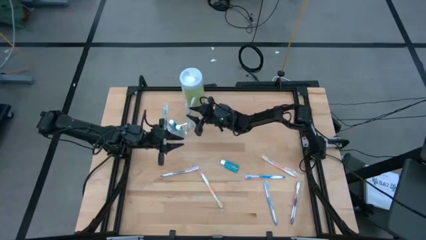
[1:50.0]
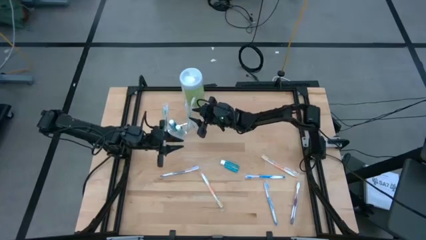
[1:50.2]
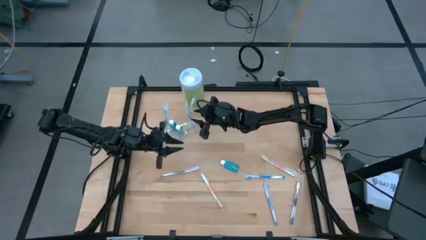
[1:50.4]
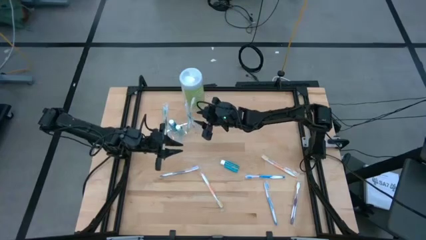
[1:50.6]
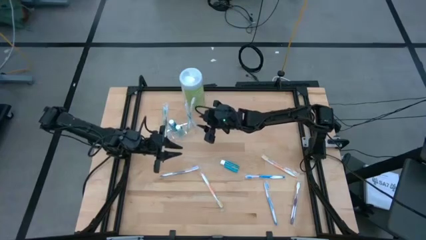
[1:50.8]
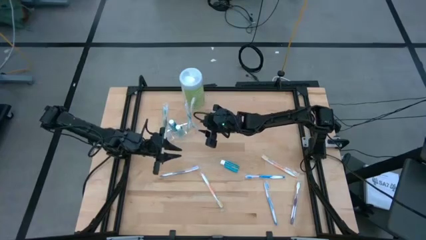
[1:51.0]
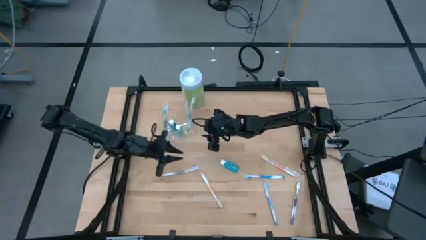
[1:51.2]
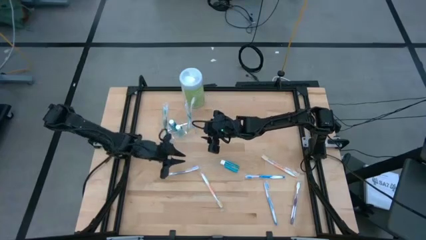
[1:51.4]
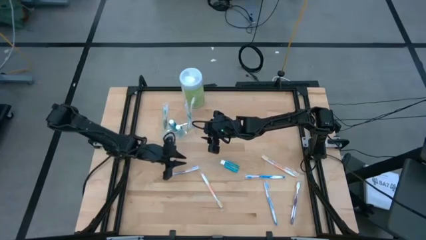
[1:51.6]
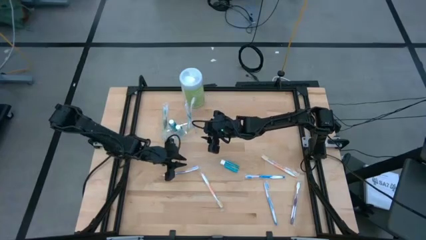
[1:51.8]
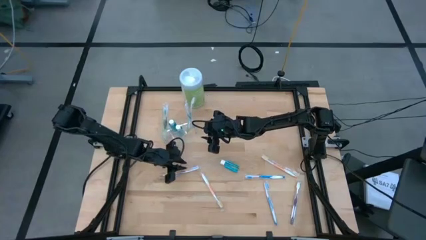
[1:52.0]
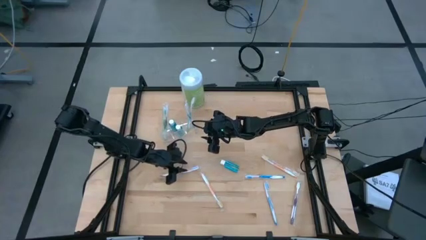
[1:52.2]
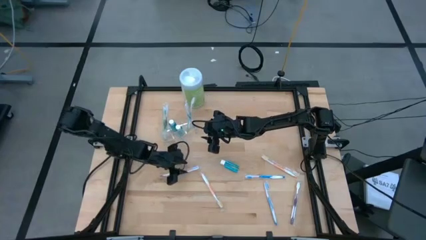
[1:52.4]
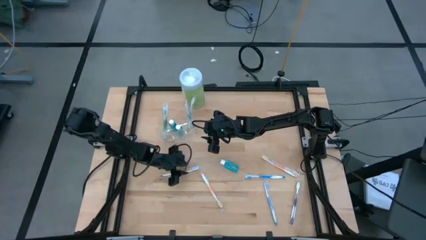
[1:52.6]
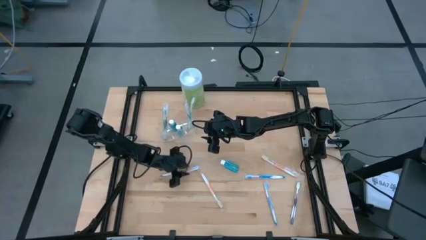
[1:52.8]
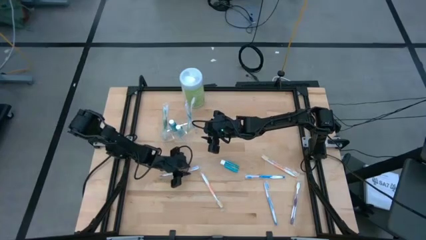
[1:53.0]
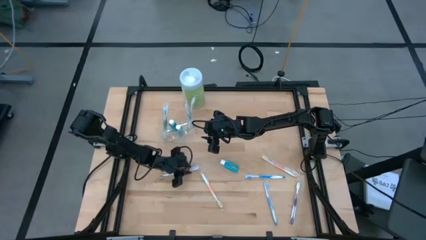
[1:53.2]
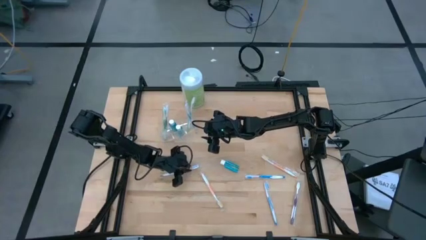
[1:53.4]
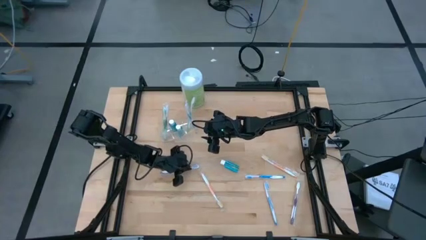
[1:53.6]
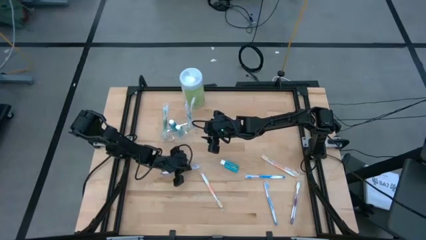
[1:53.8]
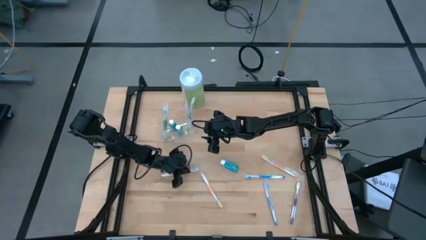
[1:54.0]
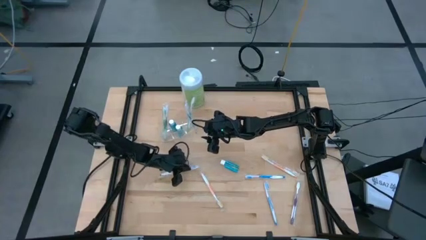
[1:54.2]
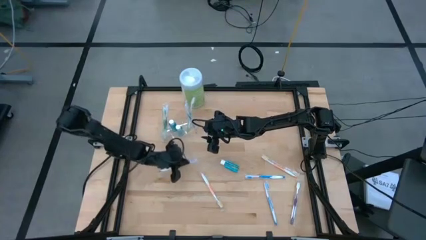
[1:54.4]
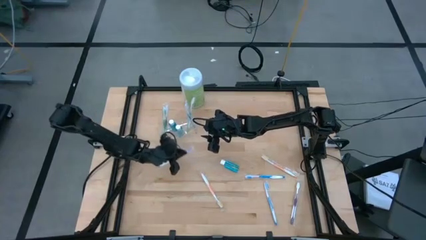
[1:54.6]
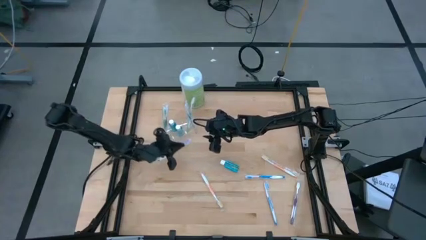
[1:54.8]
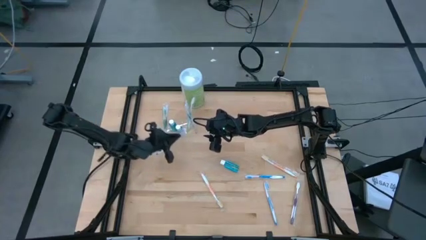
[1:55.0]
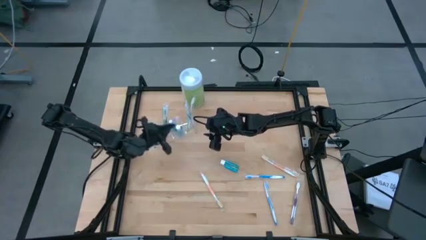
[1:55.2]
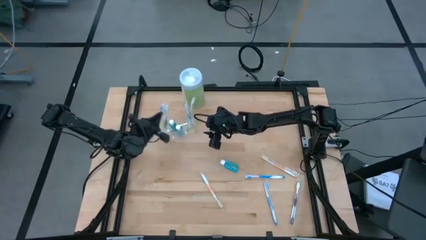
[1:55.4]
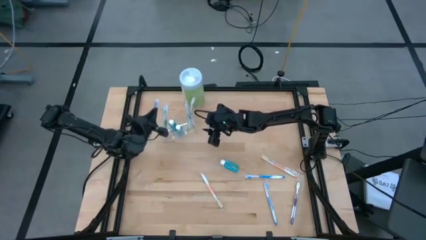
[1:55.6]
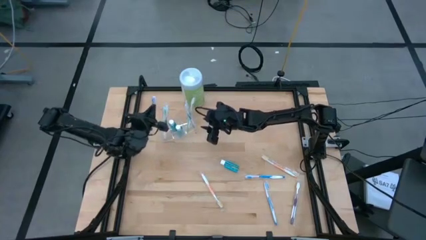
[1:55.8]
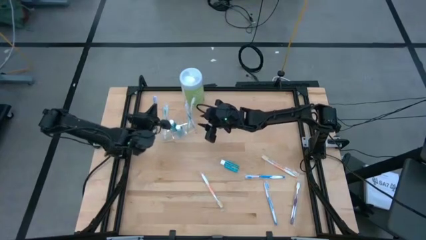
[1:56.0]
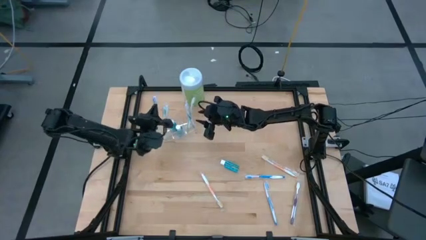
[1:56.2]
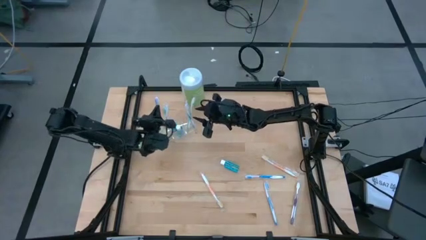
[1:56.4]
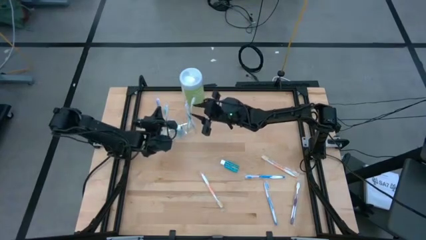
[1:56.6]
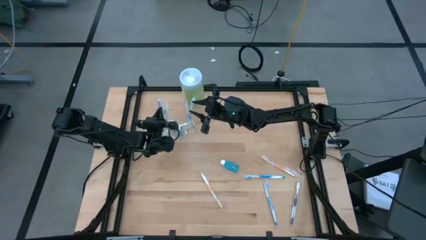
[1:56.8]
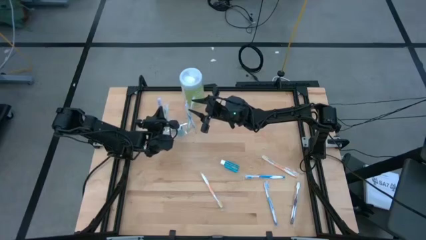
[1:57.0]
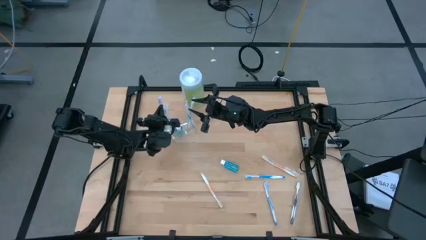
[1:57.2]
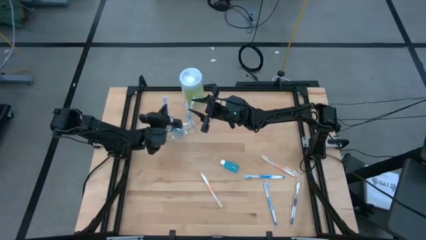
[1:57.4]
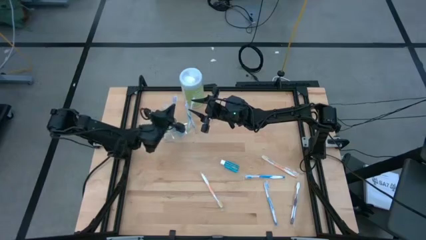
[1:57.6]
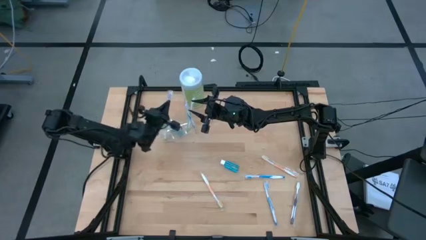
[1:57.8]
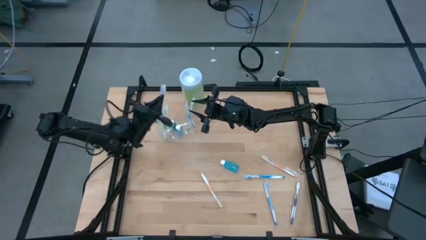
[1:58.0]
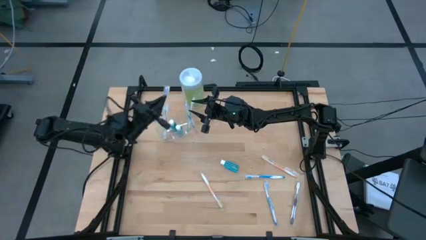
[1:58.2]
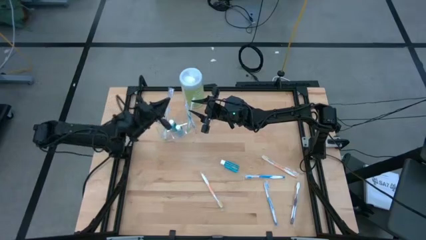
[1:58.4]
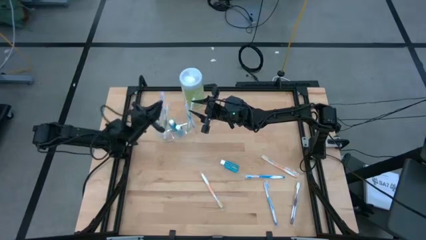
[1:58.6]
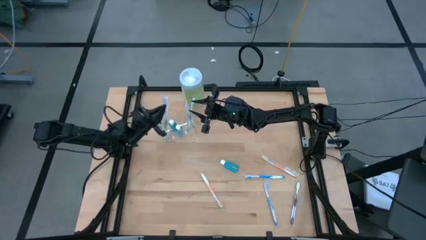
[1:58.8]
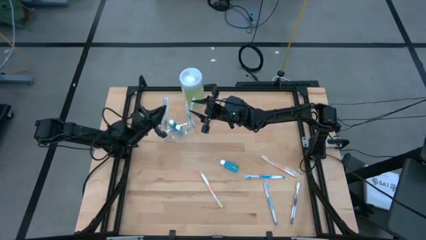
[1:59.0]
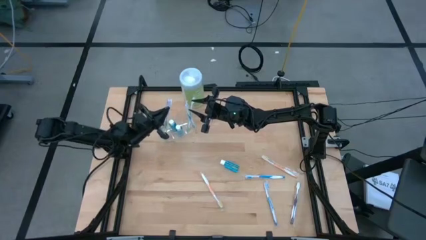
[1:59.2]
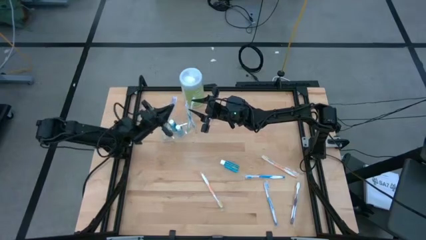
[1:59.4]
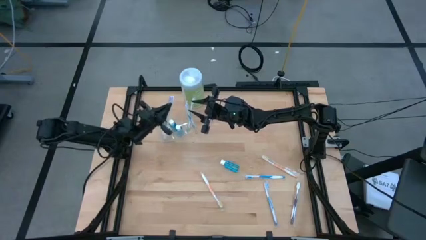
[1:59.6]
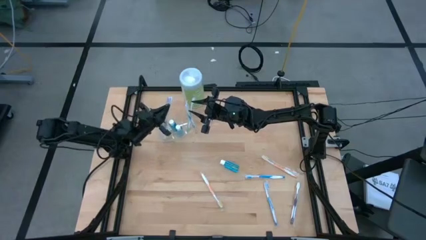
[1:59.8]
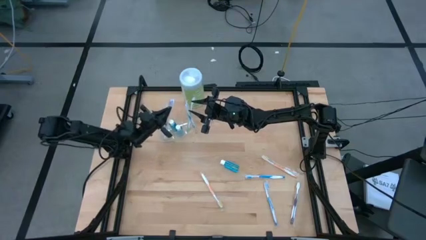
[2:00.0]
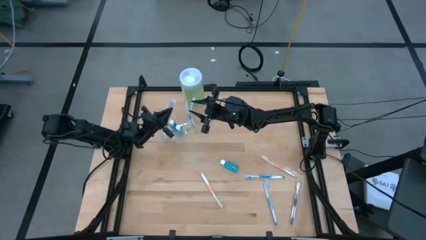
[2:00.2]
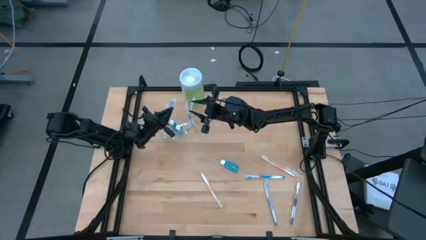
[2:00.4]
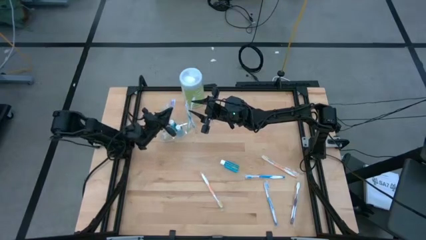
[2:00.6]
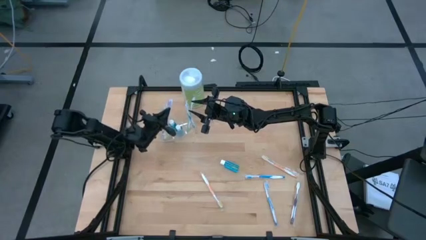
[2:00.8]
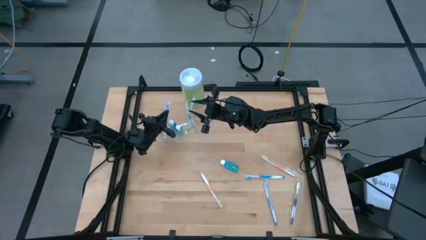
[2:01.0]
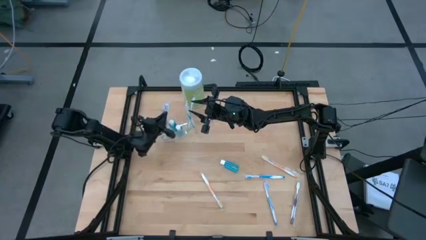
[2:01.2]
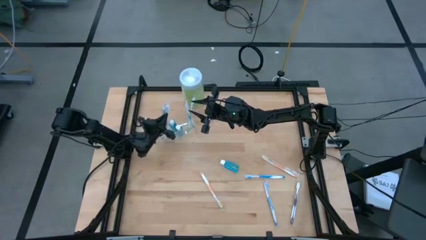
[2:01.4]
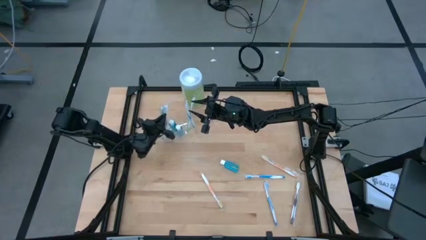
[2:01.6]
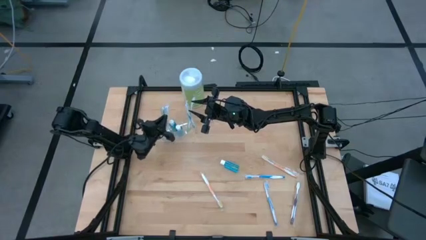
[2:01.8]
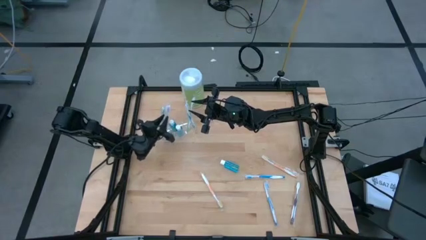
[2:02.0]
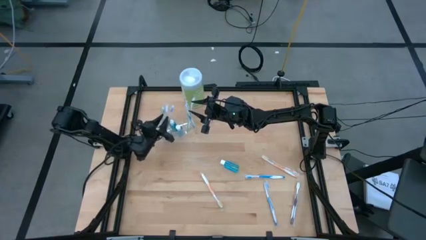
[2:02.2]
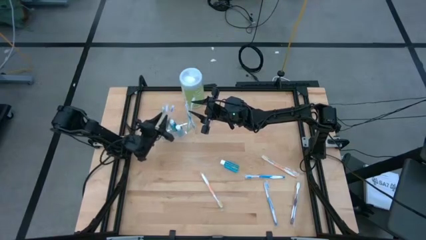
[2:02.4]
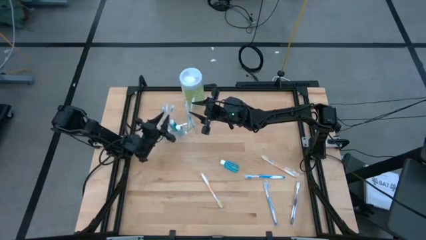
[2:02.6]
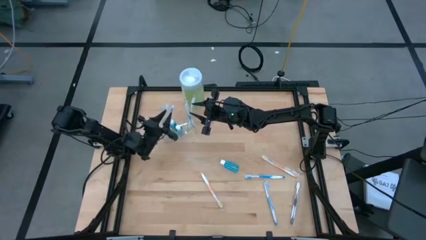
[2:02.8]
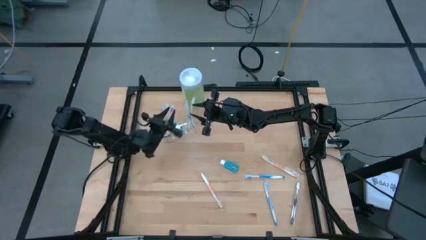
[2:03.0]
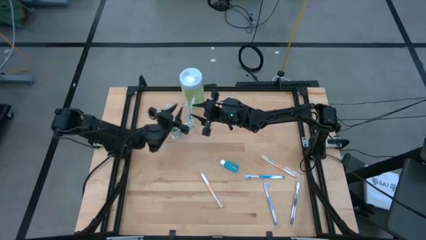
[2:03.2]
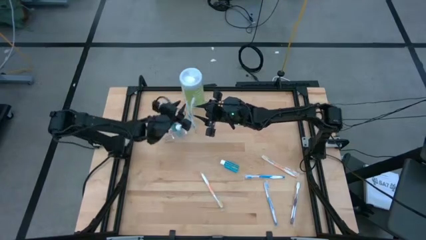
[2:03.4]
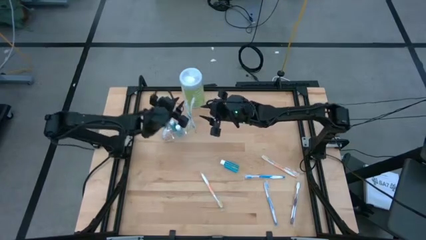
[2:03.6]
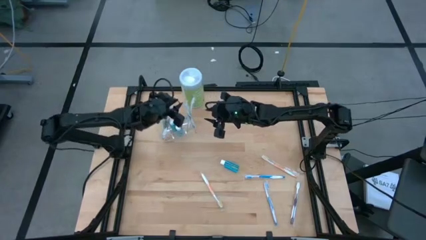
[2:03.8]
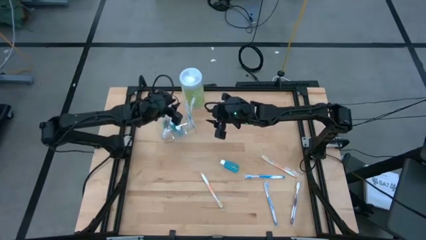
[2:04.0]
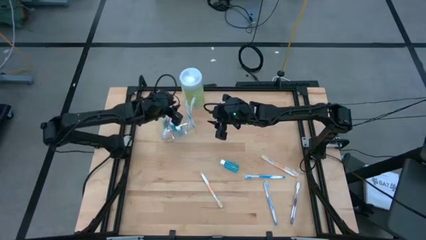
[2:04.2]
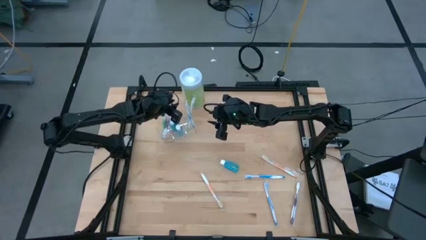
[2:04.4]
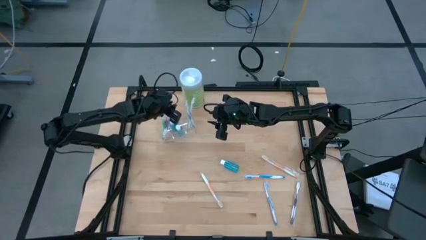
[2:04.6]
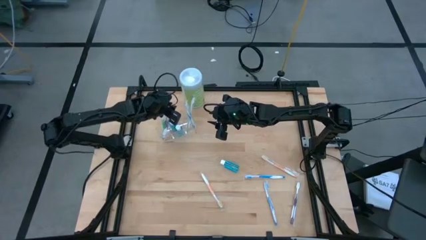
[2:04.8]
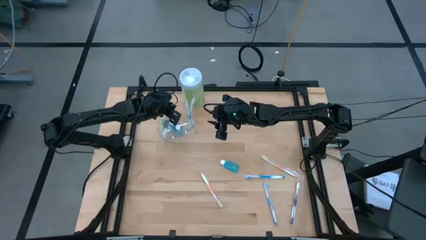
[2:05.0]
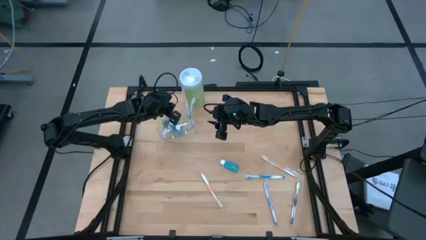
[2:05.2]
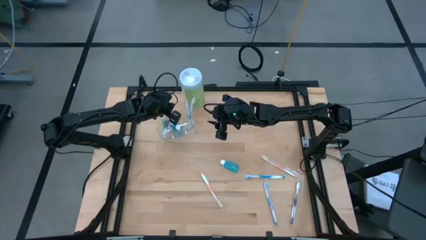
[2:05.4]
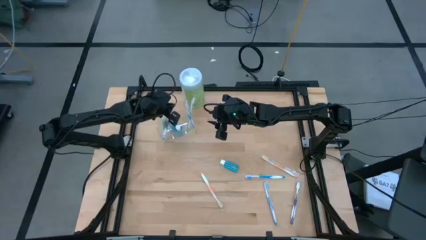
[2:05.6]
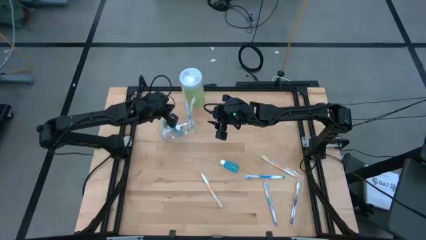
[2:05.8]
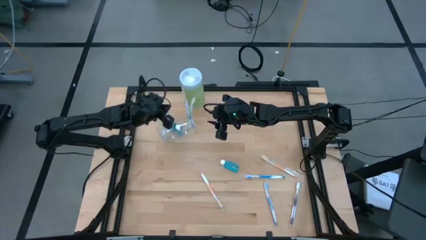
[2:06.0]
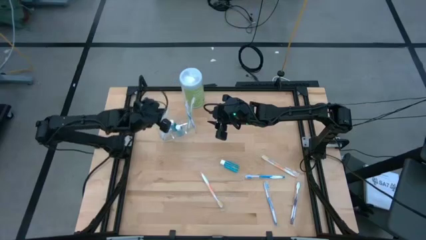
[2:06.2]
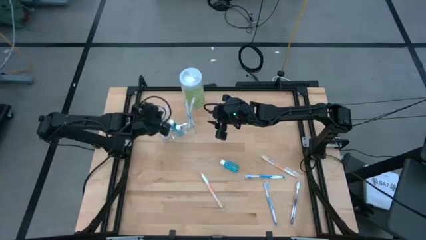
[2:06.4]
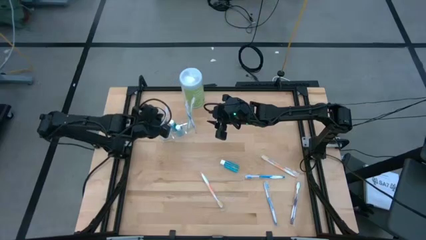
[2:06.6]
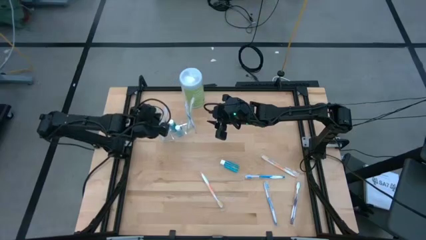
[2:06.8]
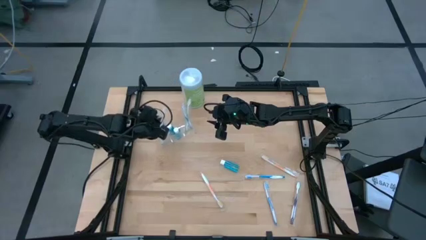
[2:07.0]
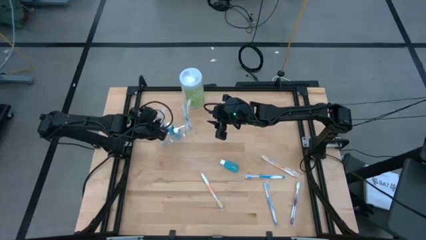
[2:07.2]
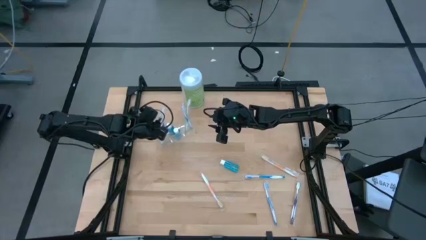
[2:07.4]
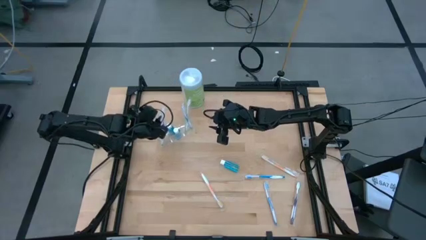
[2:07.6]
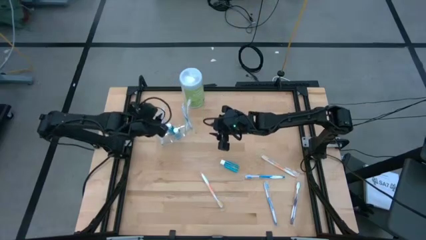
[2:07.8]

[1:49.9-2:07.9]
Task: Pick & Place toothbrushing station
Put the left purple toothbrush into the transparent organizer
